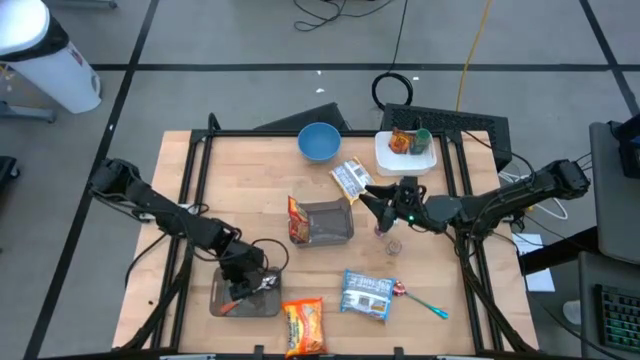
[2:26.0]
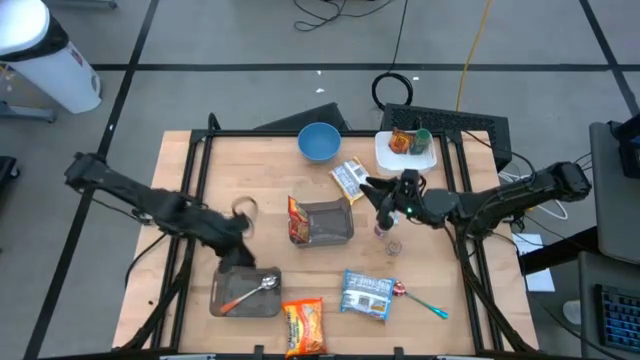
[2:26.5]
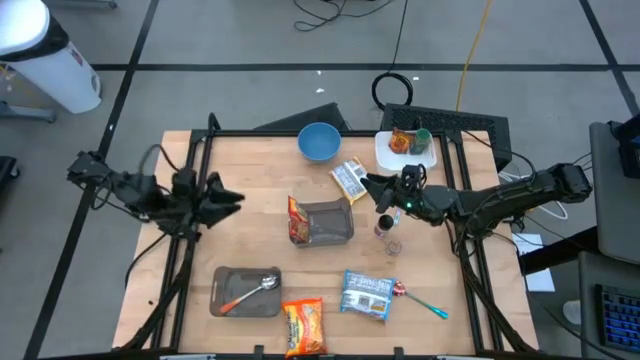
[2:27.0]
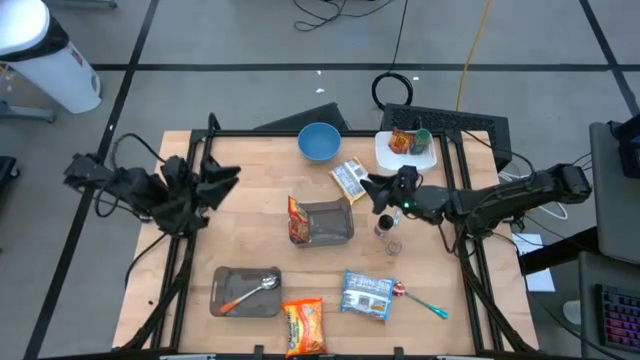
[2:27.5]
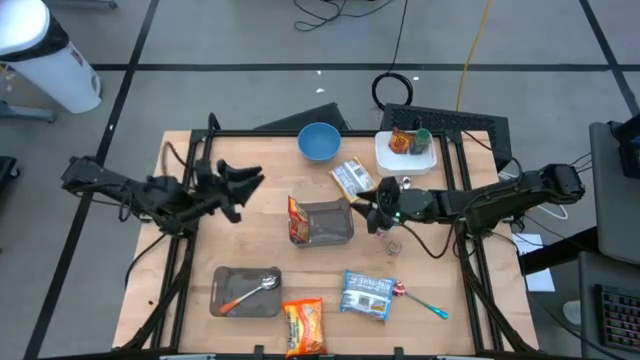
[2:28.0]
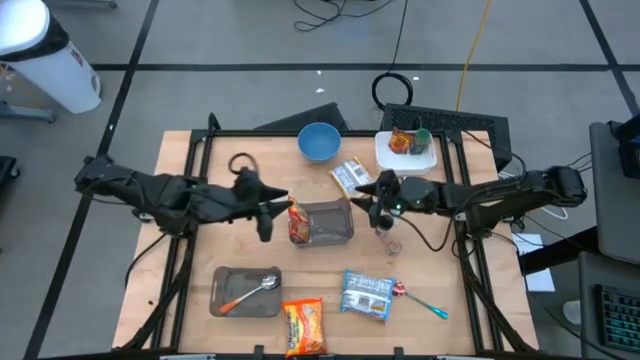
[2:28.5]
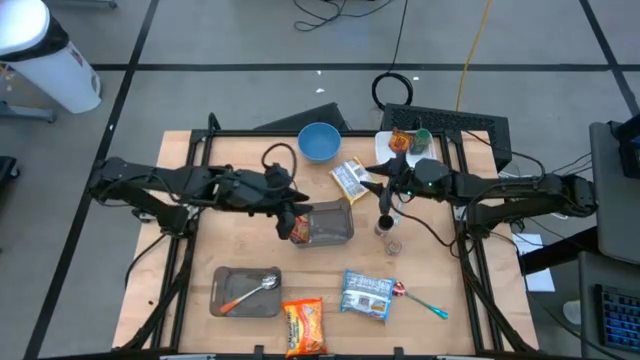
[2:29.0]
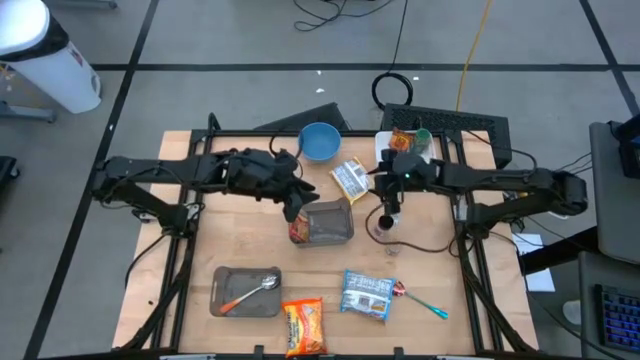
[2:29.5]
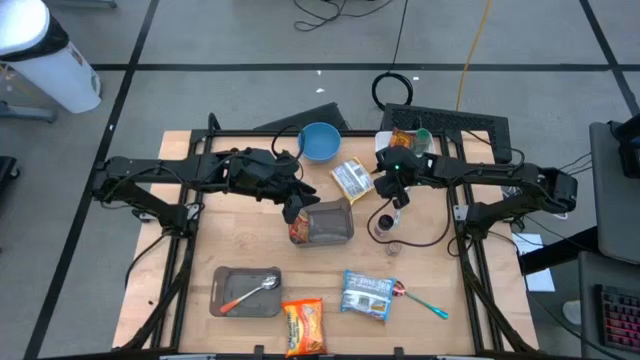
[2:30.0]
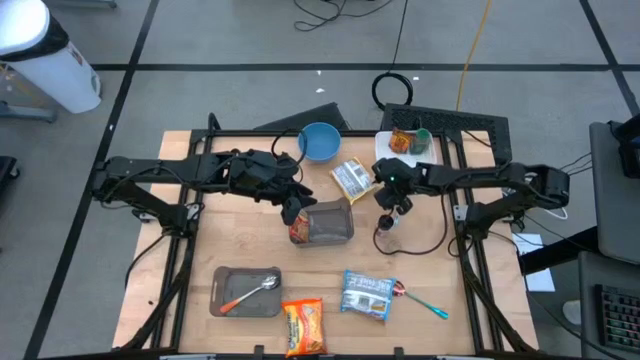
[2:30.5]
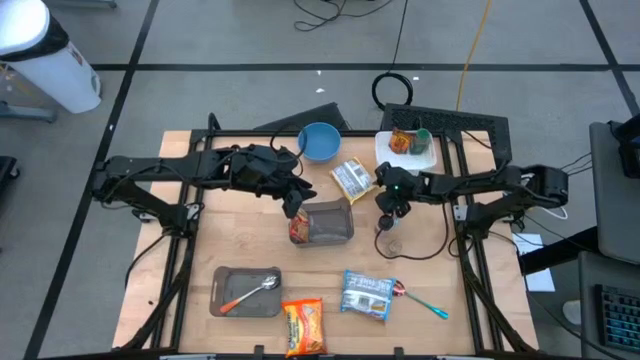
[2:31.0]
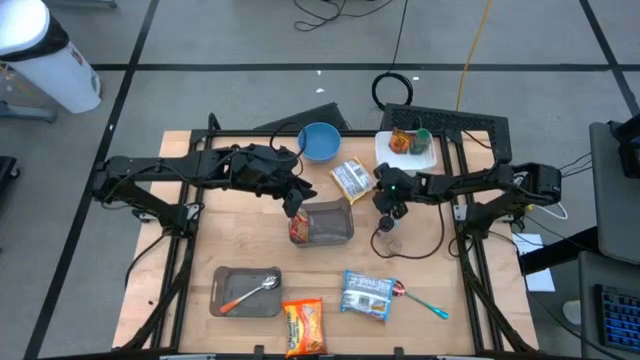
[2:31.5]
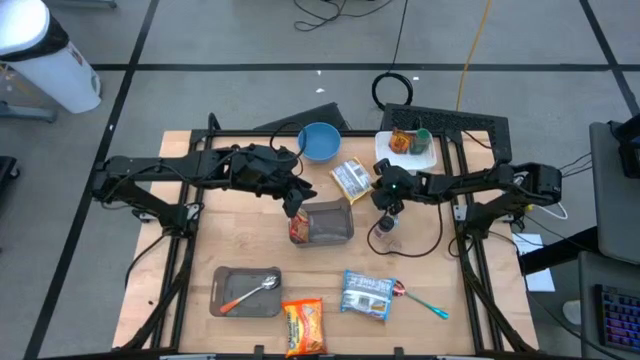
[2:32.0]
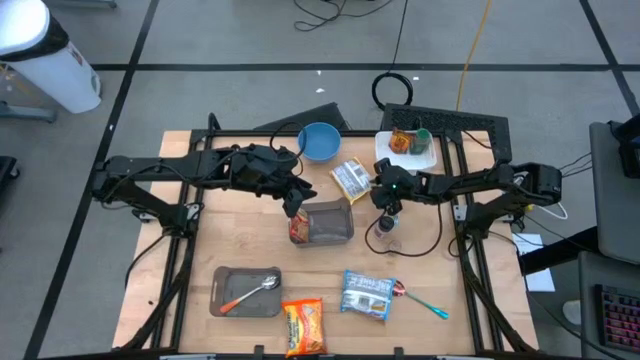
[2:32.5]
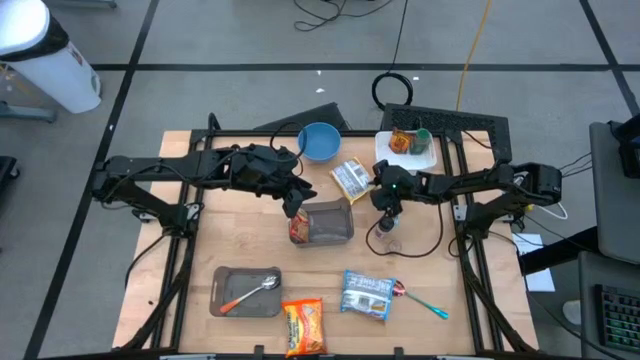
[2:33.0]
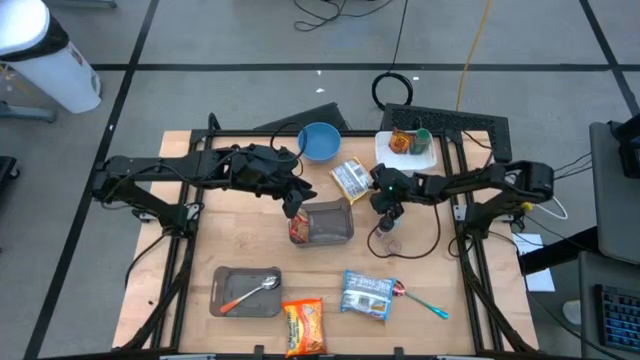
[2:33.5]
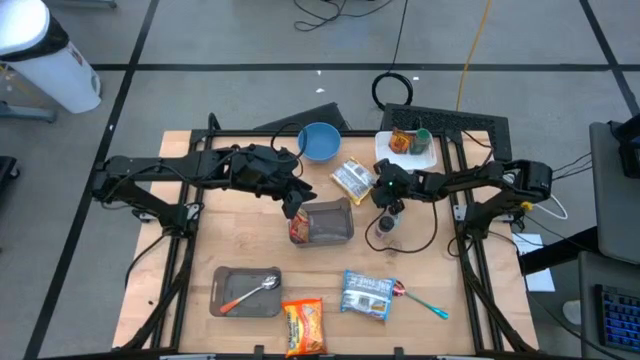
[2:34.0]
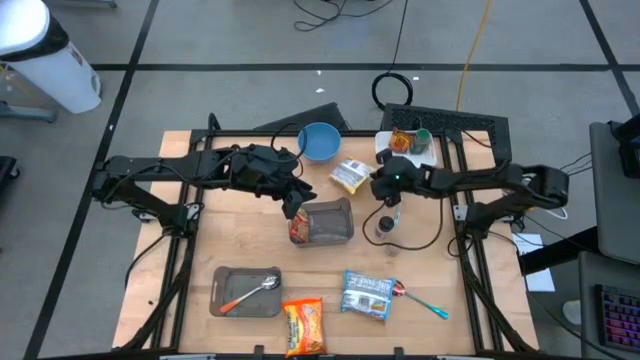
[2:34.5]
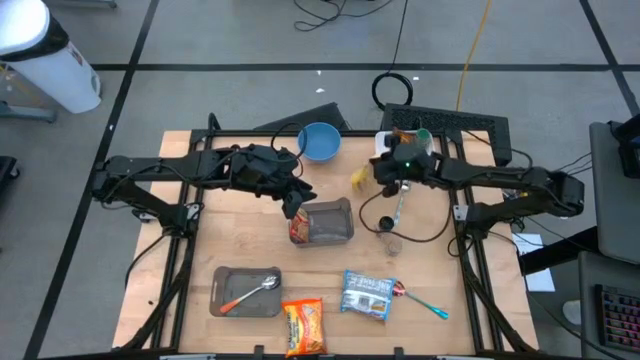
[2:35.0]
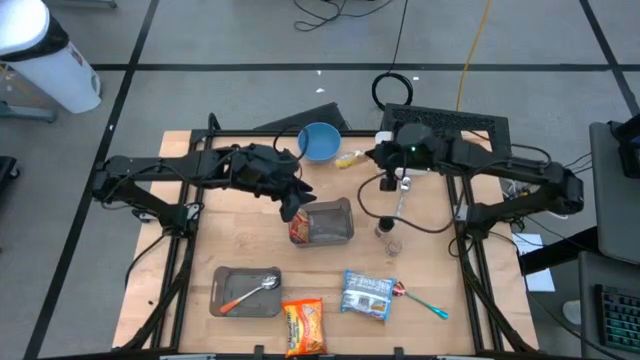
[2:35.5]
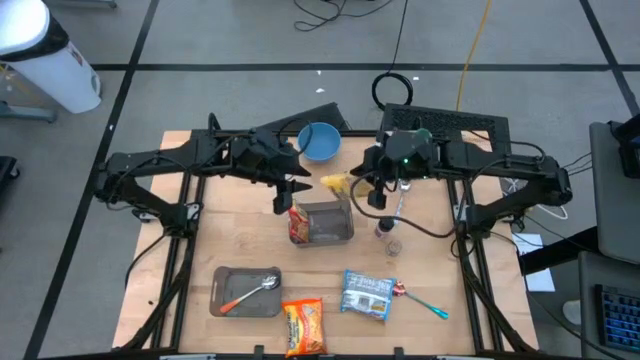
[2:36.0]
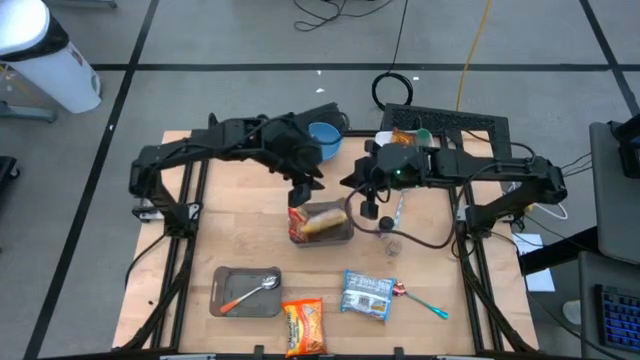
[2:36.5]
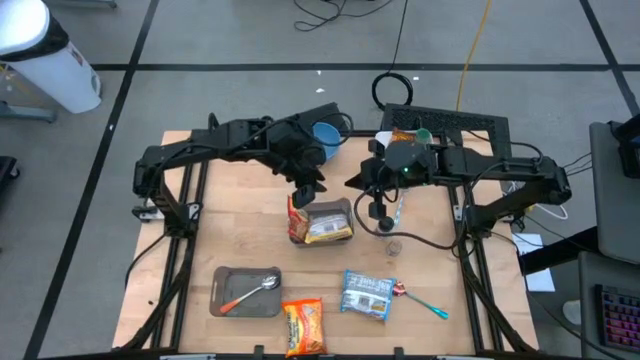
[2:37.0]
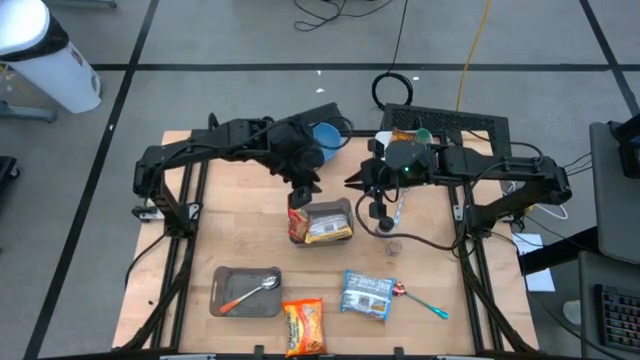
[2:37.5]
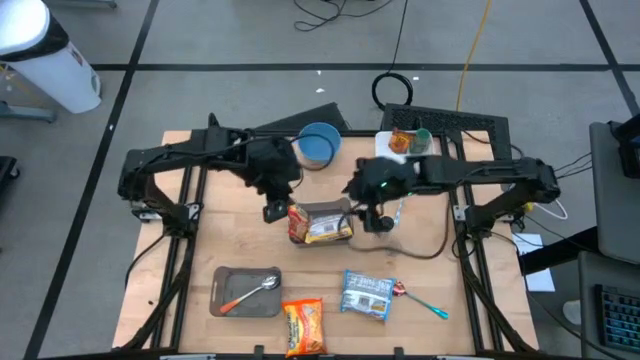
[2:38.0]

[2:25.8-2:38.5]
Task: Pick & Place Food Item
Put the yellow noodle pack into the top black bin

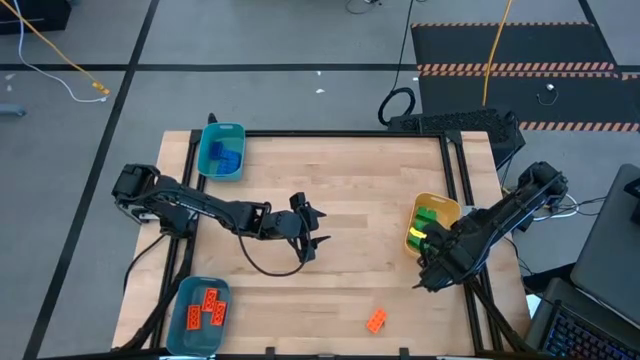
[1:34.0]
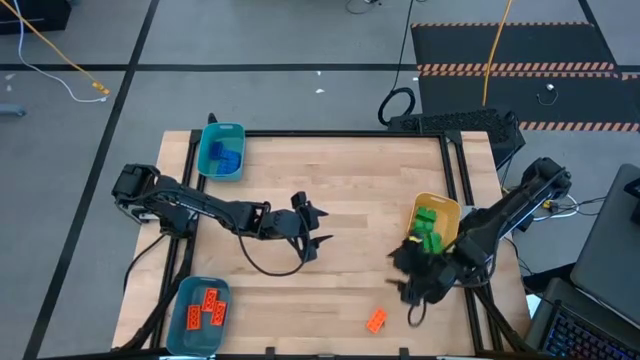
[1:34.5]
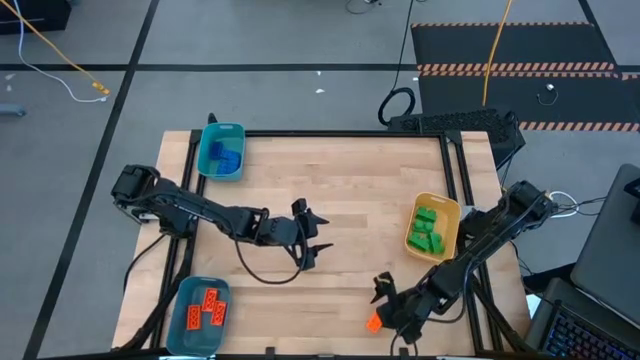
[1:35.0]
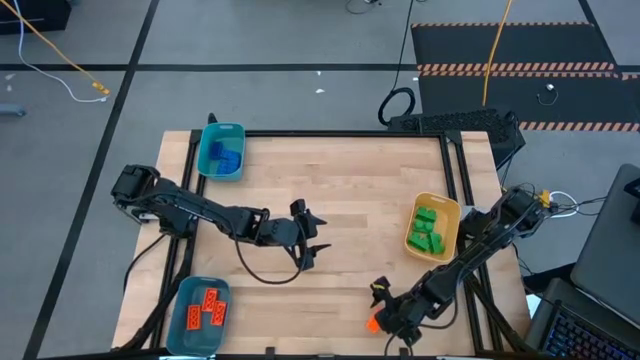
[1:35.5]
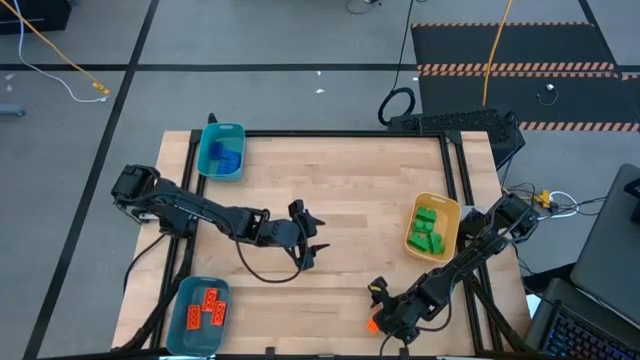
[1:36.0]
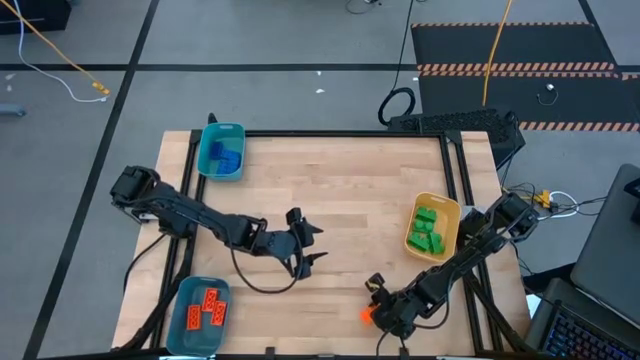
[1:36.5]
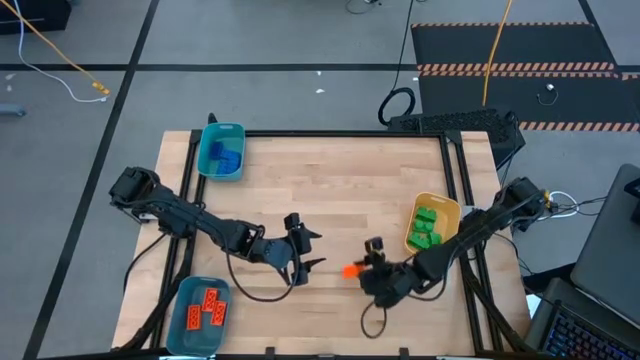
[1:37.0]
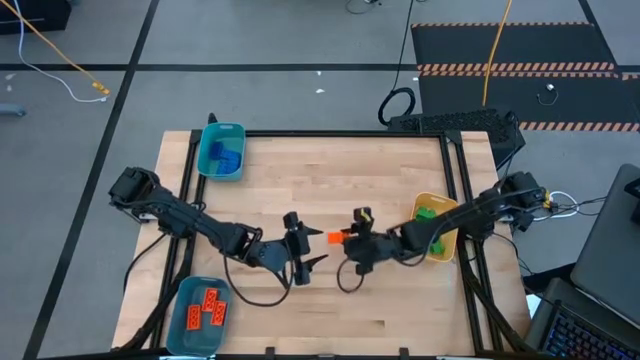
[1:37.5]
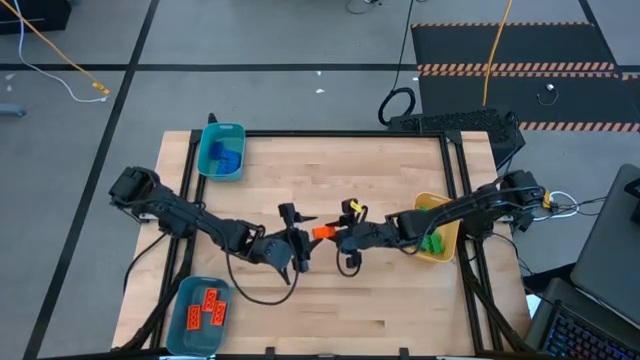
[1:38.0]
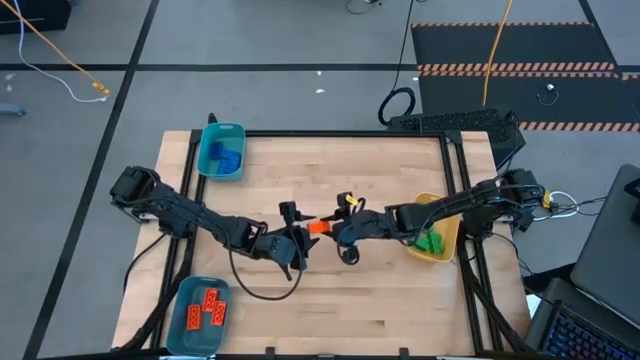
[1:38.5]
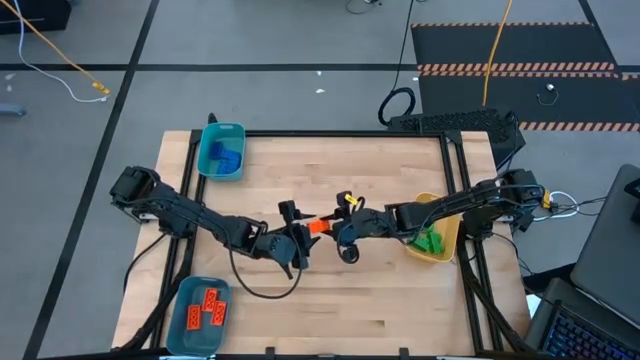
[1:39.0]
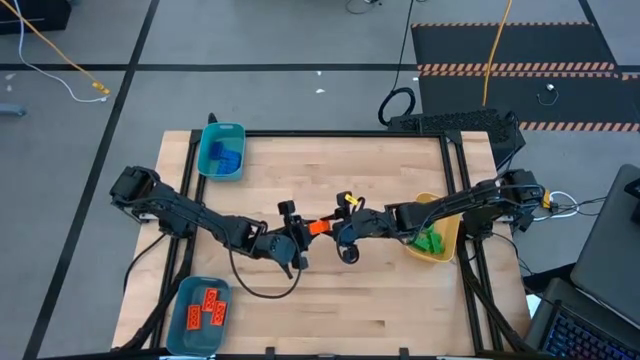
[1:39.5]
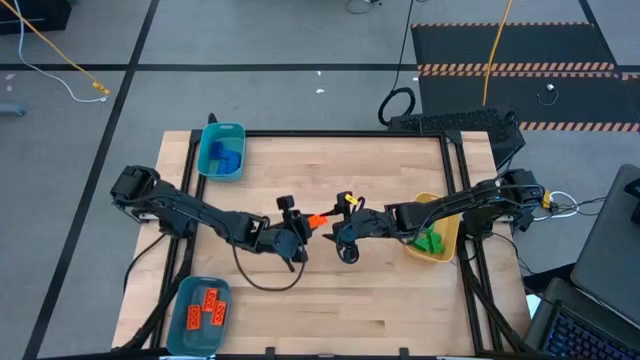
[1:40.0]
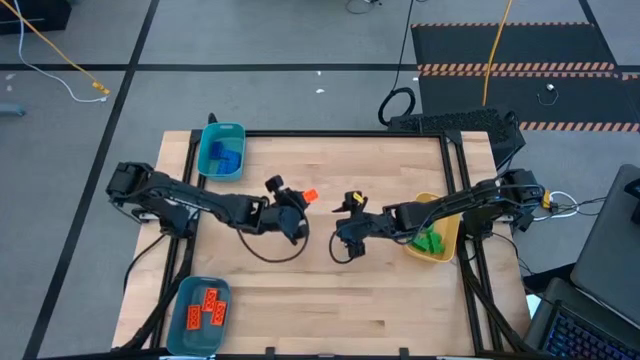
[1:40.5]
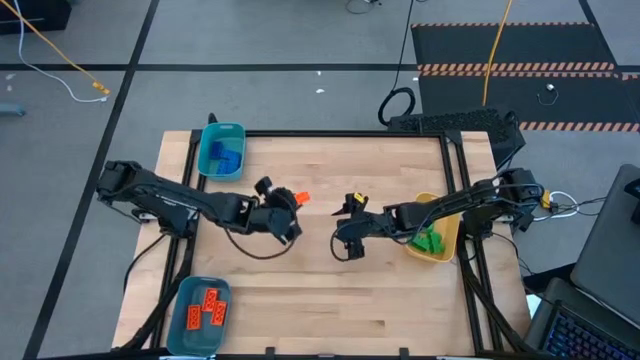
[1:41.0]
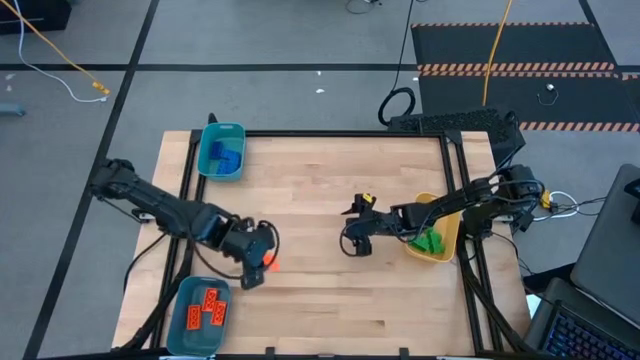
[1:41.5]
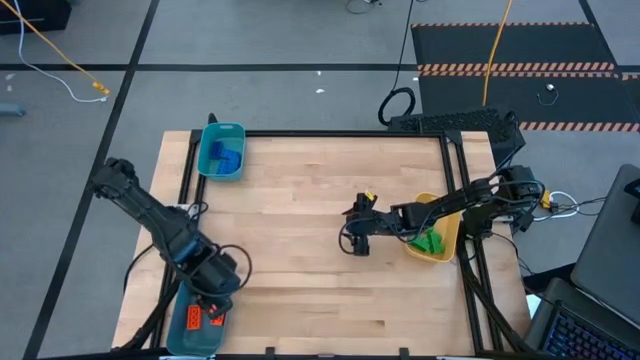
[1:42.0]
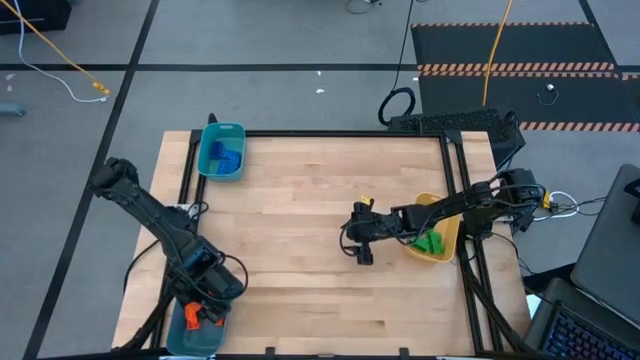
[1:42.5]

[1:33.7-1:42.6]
Task: Sort & place blocks by color
Put the orange game piece into the dark blue bin
